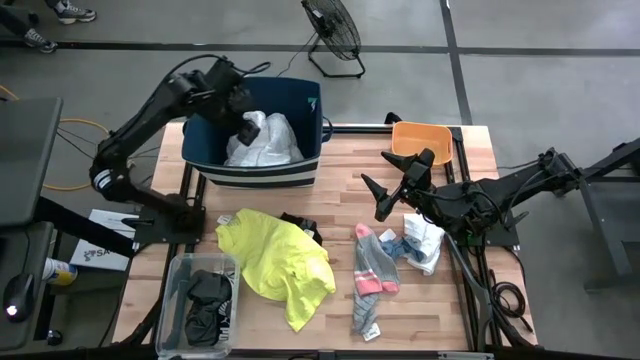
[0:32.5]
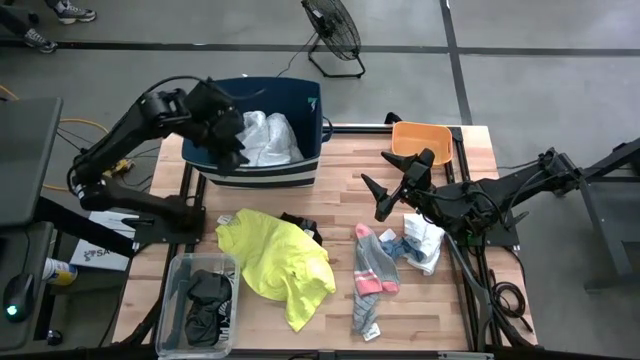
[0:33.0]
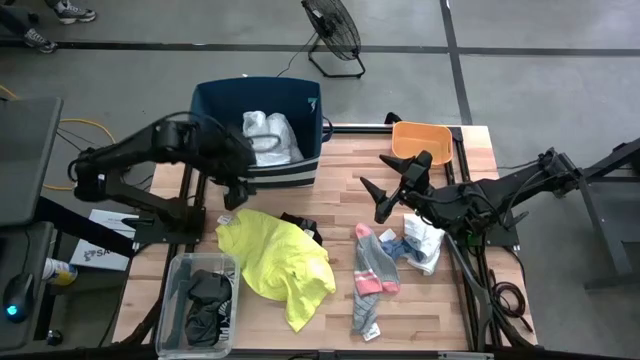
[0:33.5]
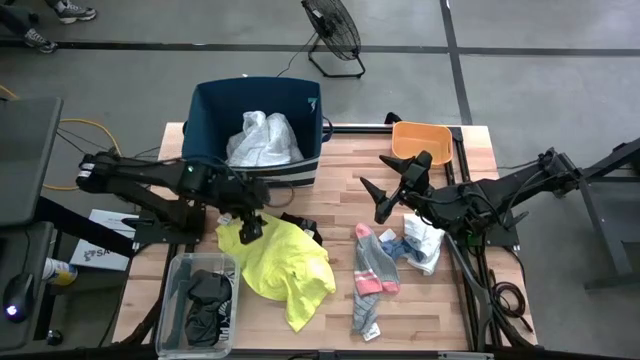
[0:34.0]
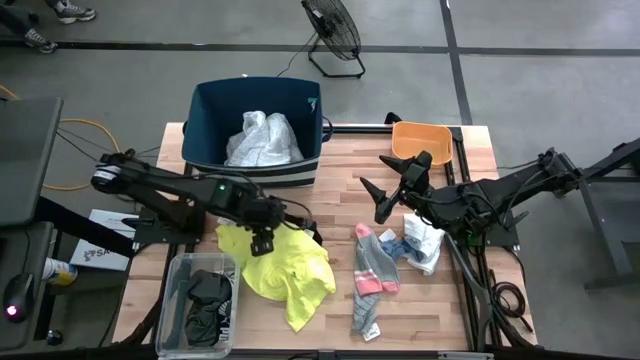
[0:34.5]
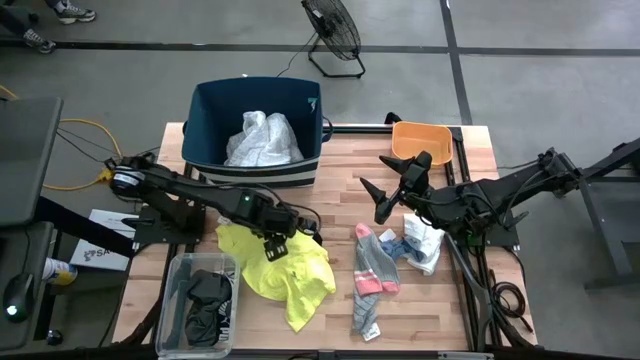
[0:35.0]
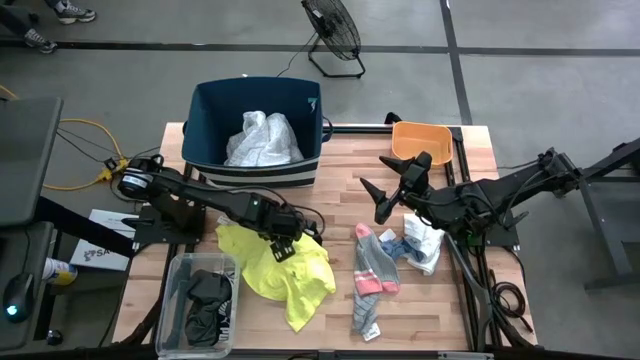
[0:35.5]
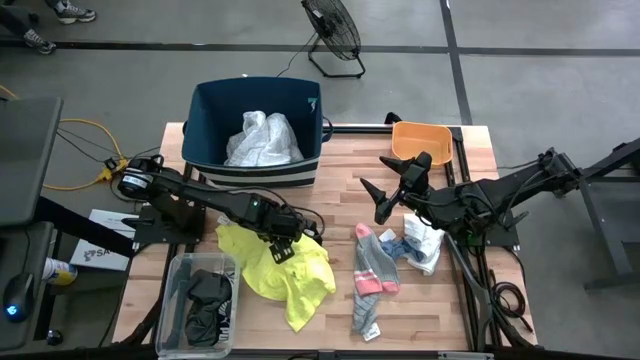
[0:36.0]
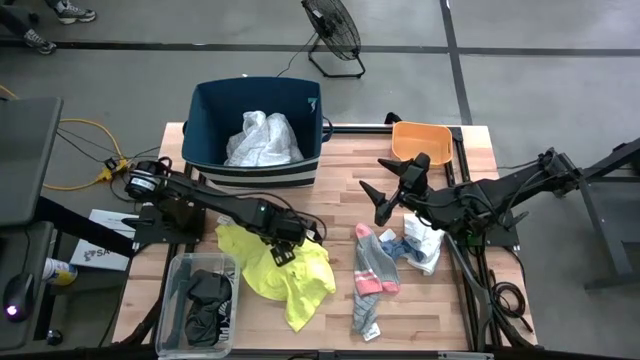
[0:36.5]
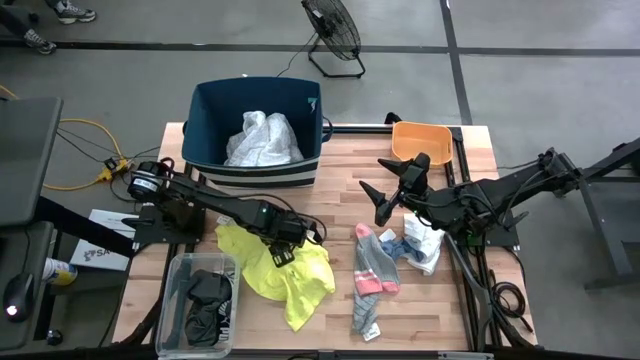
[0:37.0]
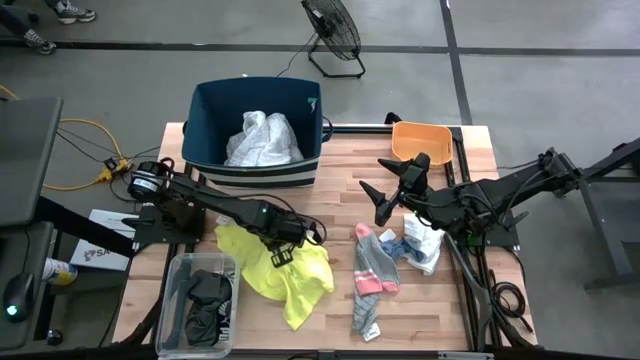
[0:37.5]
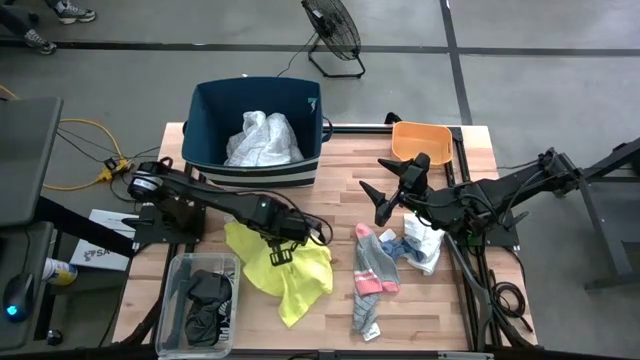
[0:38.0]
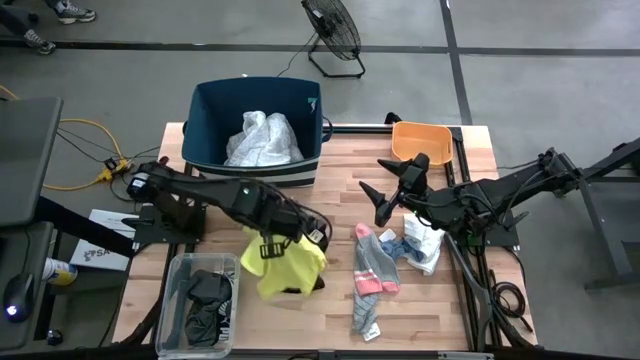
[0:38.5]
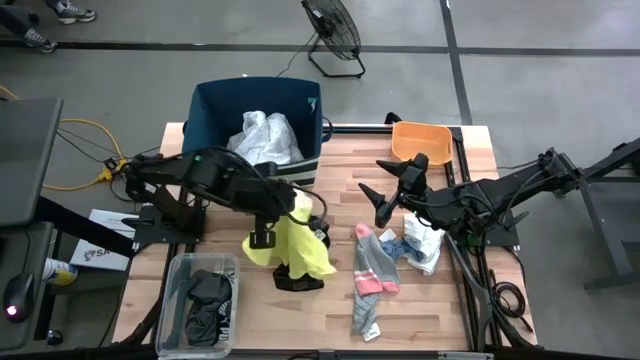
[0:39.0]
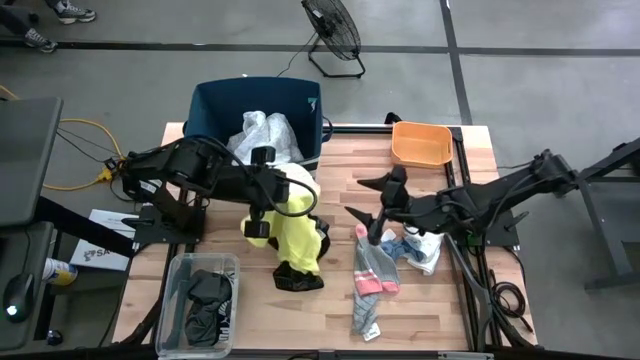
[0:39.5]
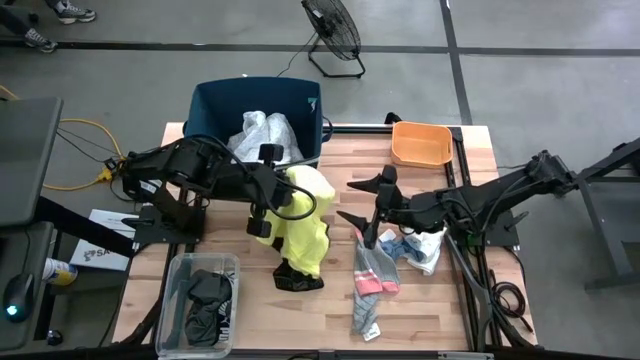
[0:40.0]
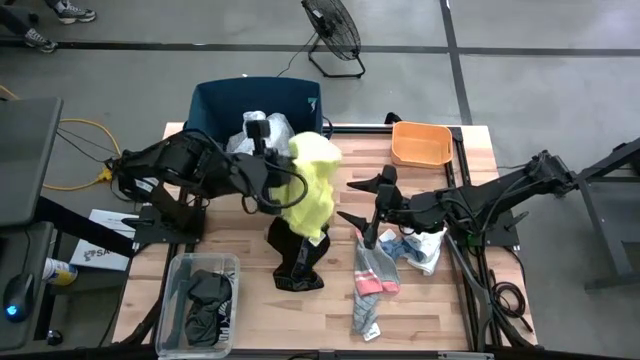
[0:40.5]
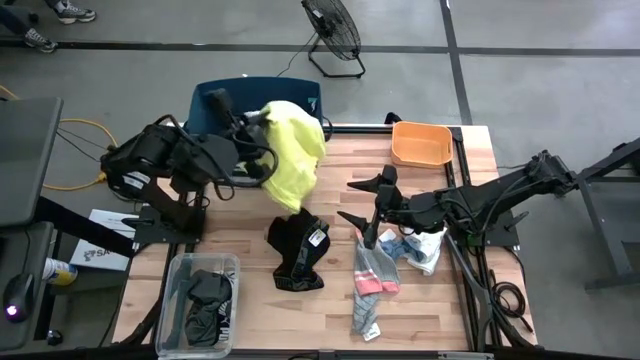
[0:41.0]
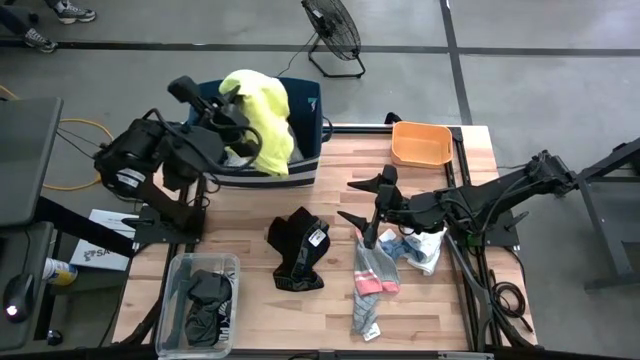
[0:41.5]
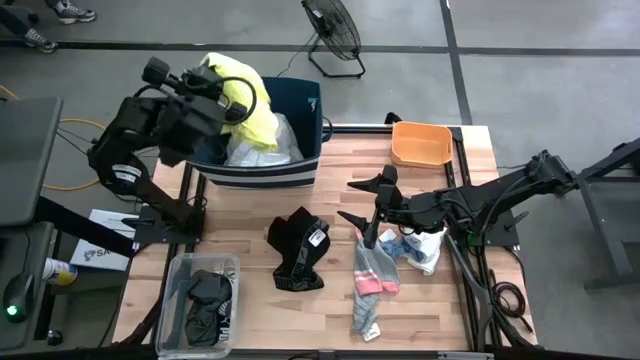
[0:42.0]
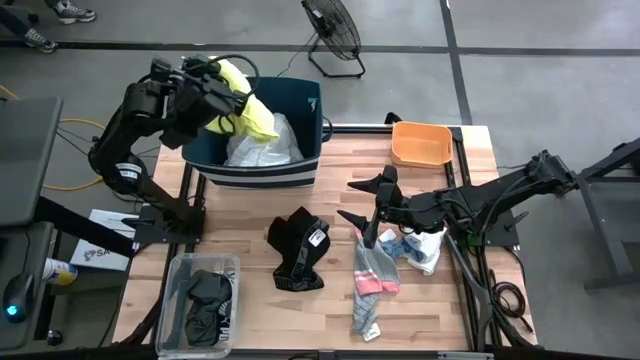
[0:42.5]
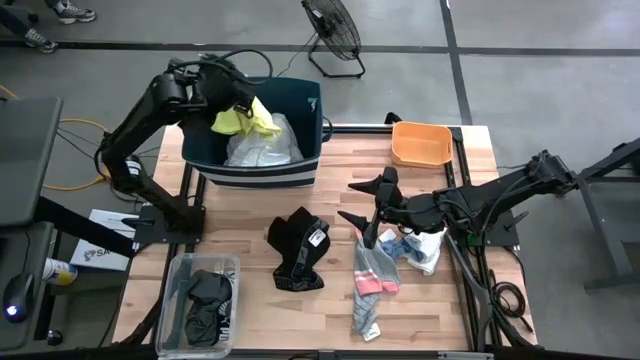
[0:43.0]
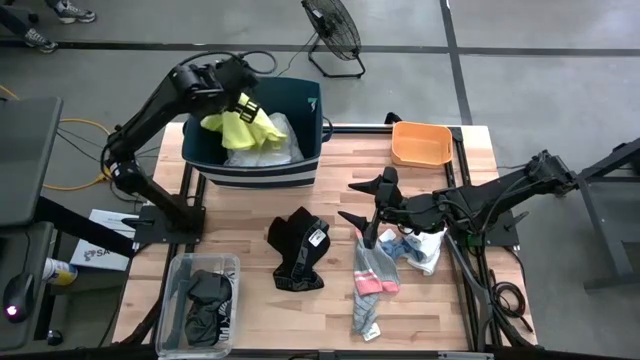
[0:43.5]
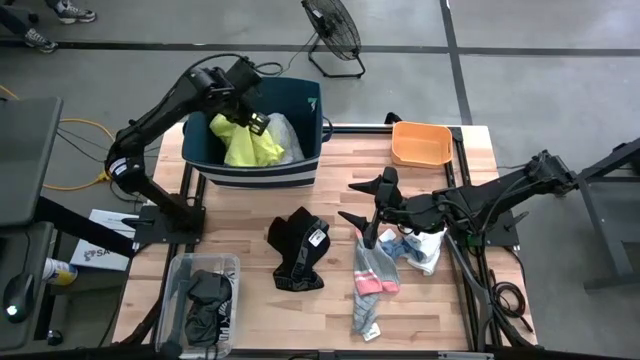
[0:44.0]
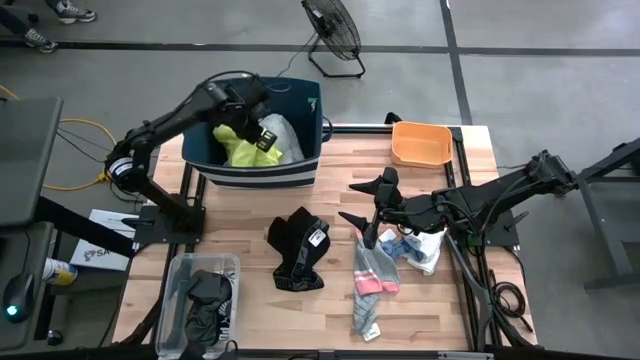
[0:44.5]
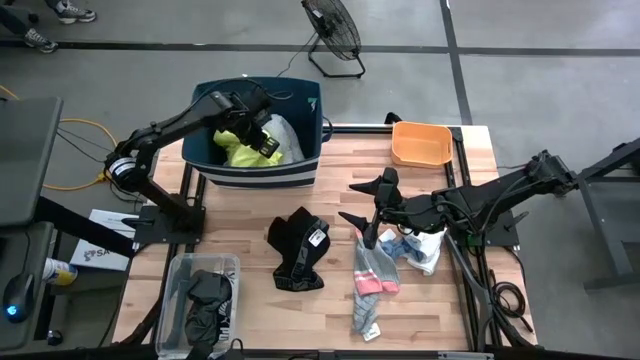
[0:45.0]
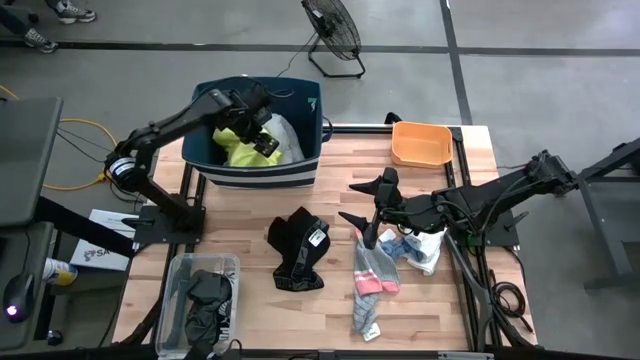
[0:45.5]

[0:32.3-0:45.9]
Task: Pick & Place Cloths
Put the yellow shirt into the laundry bin

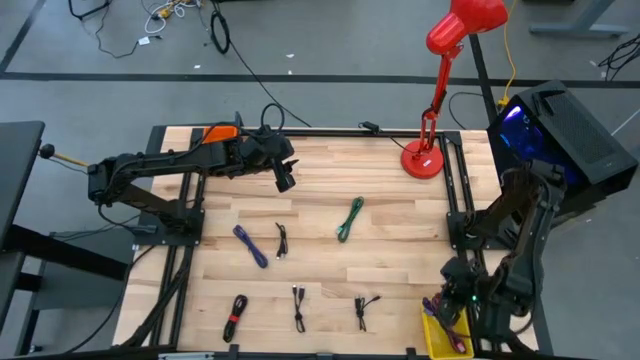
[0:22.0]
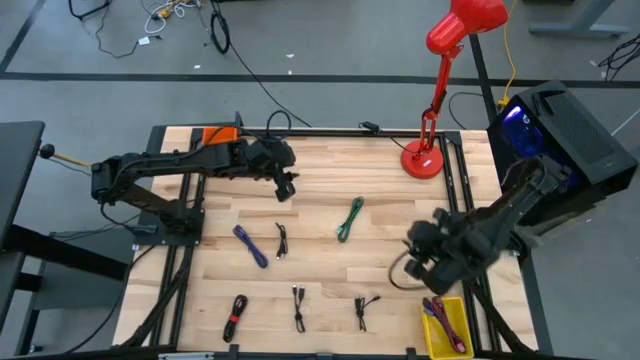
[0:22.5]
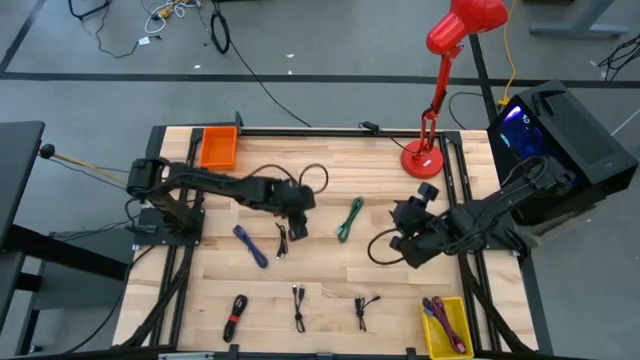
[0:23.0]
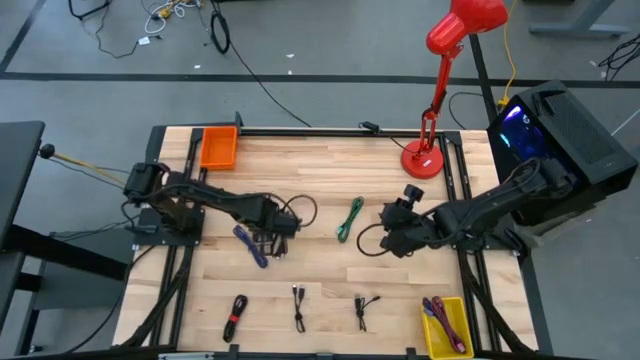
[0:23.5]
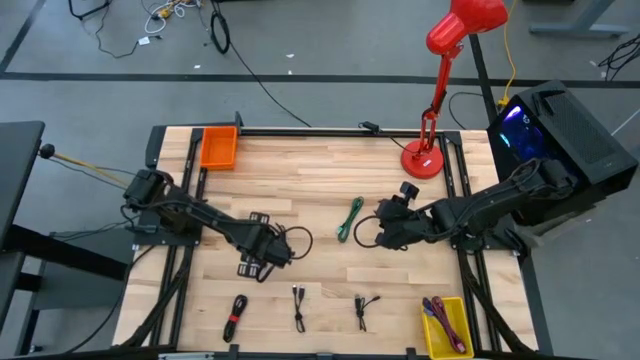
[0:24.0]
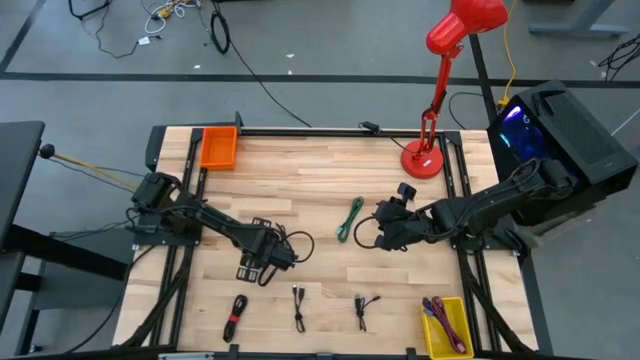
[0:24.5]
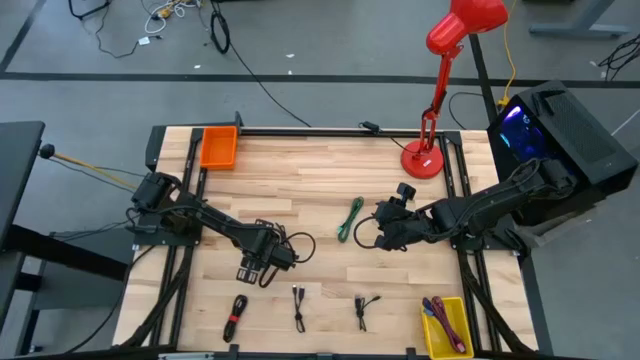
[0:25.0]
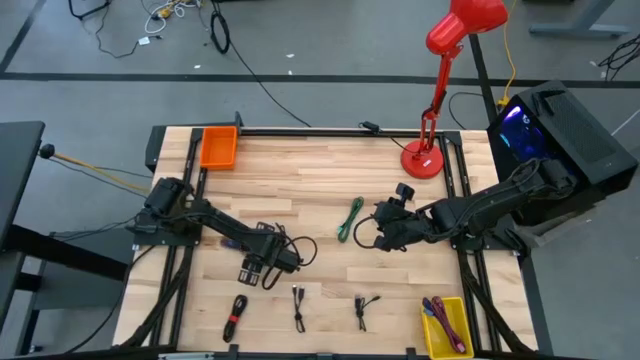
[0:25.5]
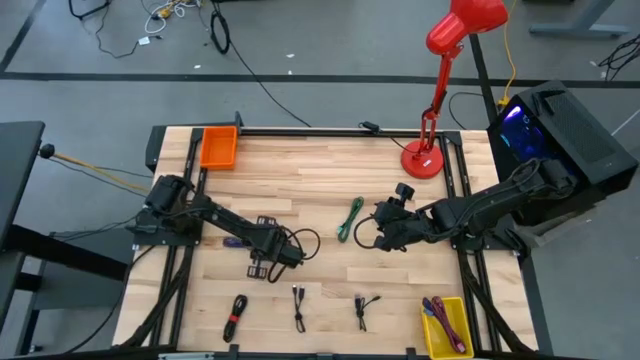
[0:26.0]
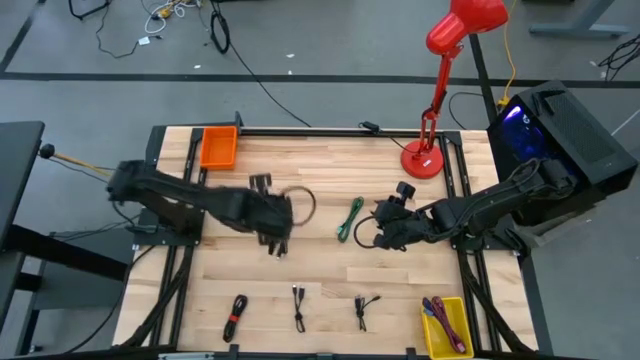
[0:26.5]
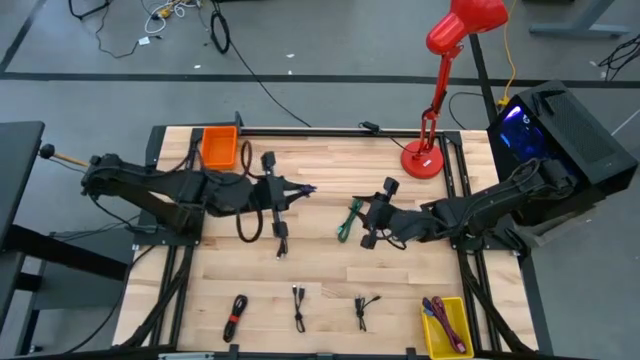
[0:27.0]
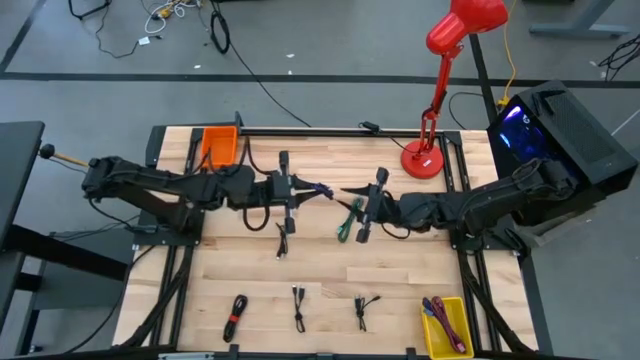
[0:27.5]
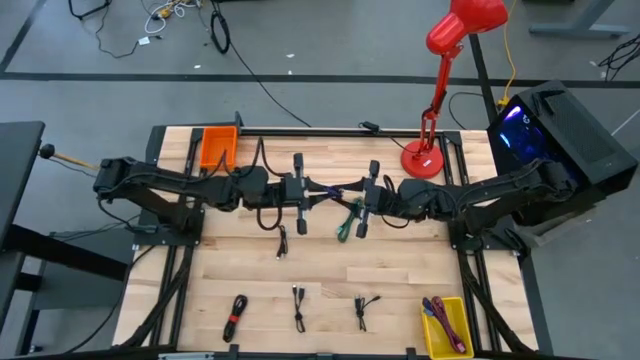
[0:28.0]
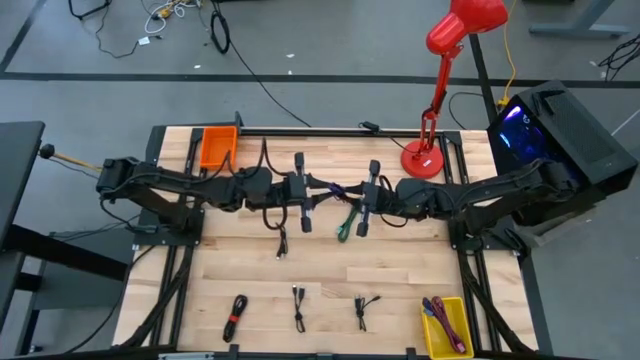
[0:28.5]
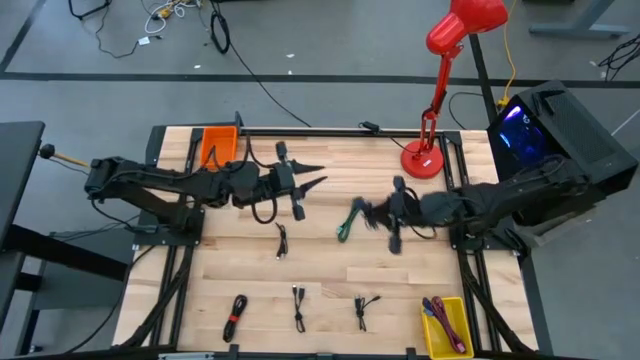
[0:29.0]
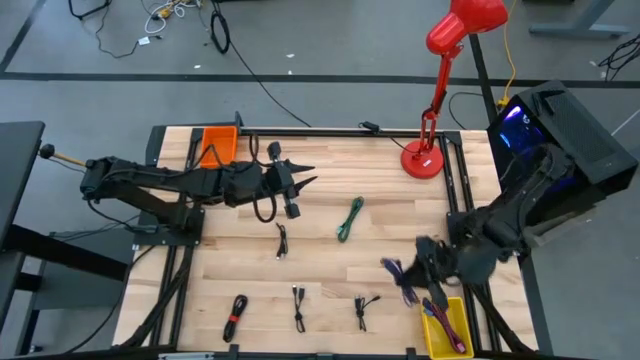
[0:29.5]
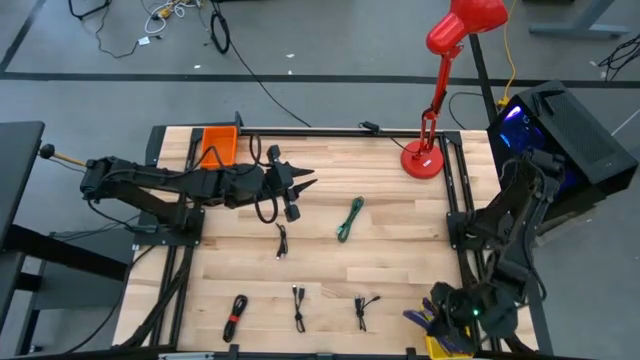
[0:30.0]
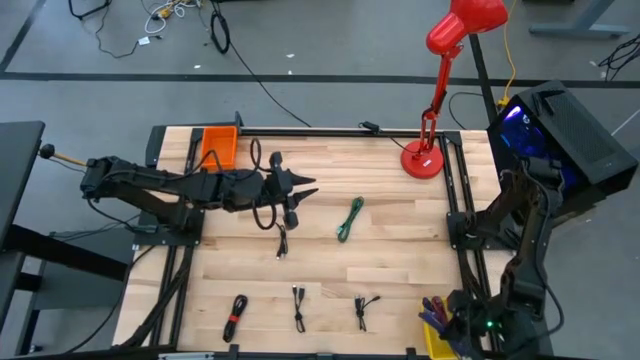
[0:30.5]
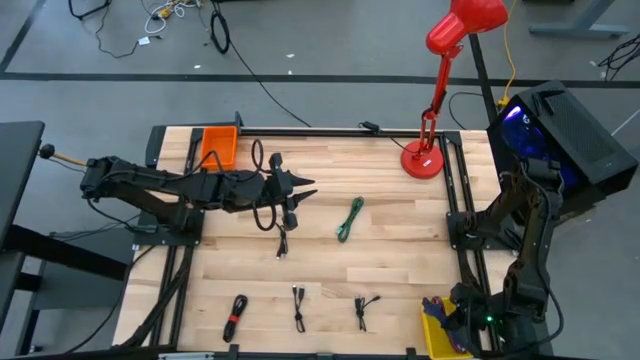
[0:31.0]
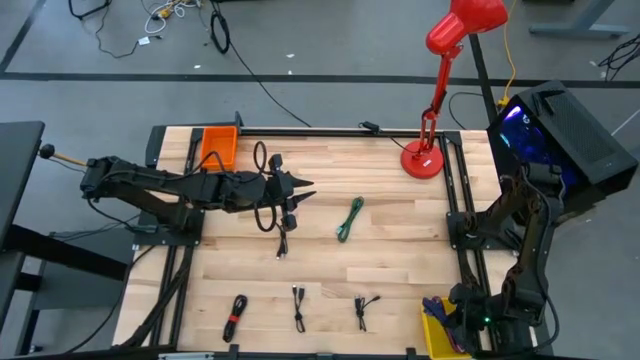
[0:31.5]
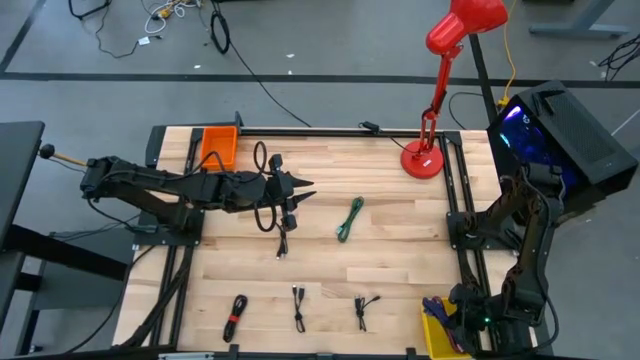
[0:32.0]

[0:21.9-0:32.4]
Task: Pick & Place USB Port
Put the blue patterned charger cable into the yellow bin
